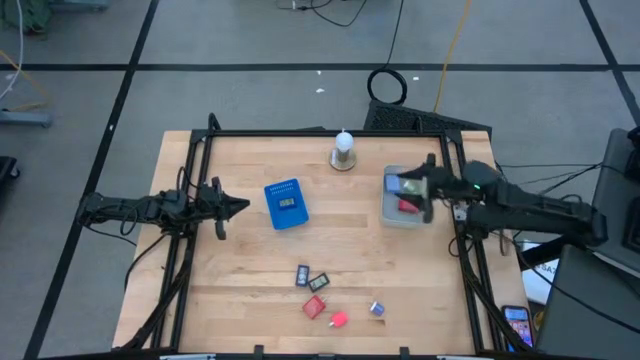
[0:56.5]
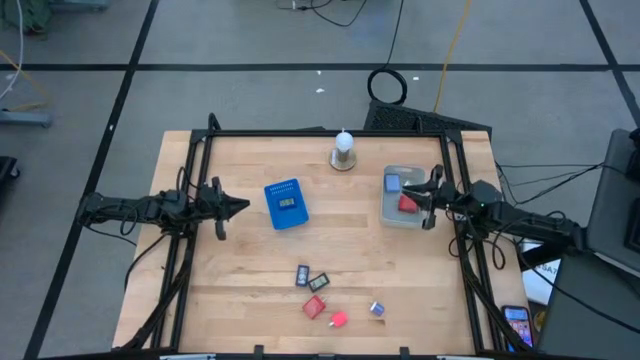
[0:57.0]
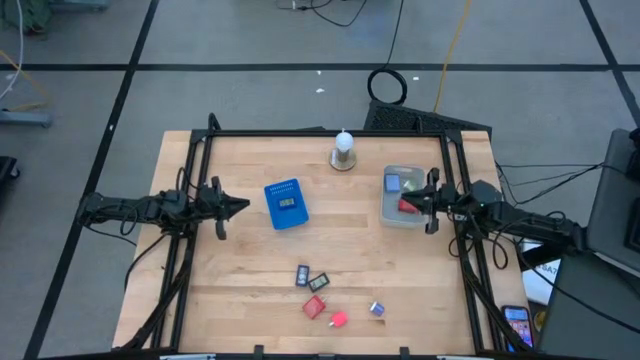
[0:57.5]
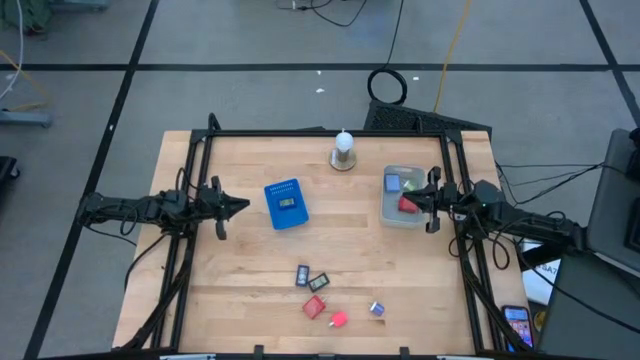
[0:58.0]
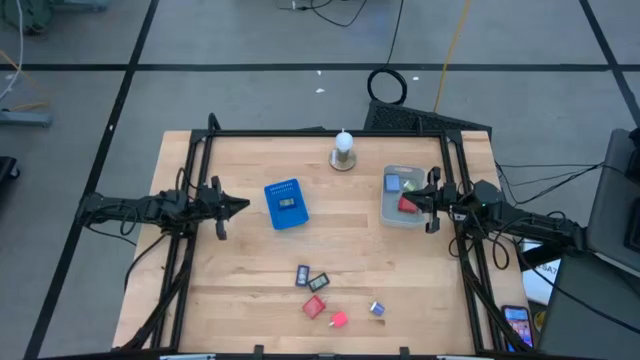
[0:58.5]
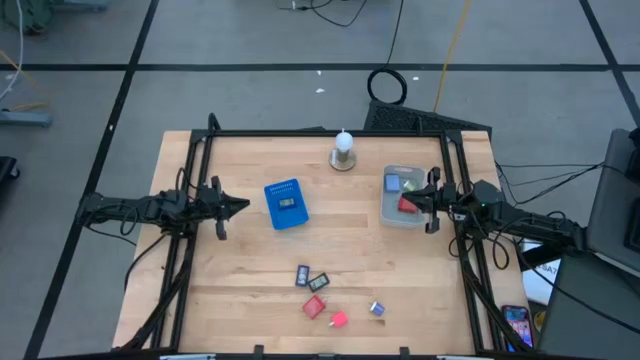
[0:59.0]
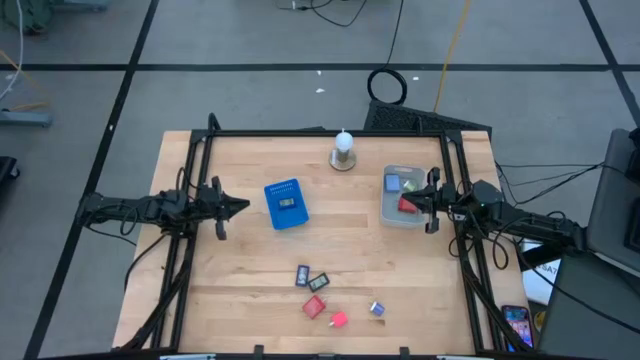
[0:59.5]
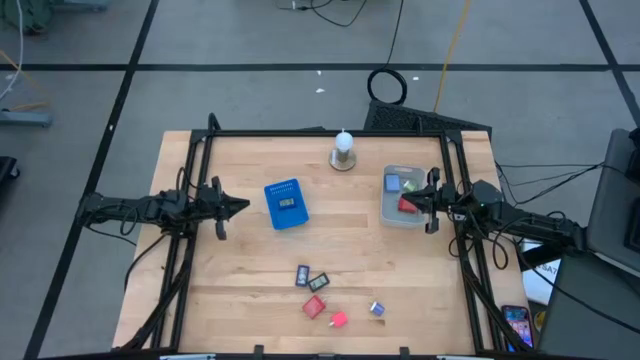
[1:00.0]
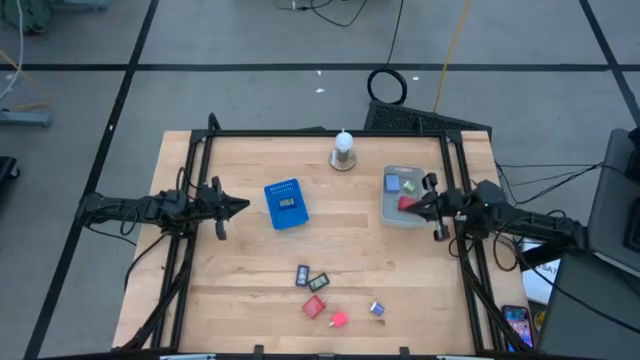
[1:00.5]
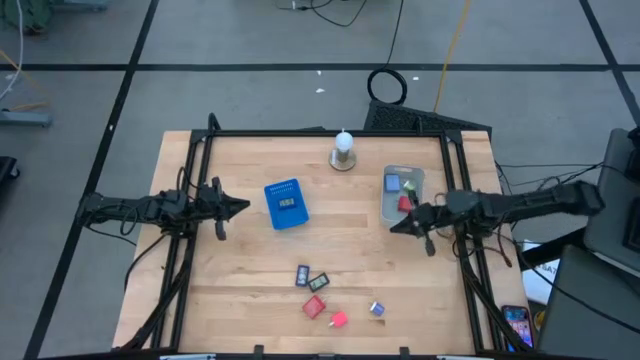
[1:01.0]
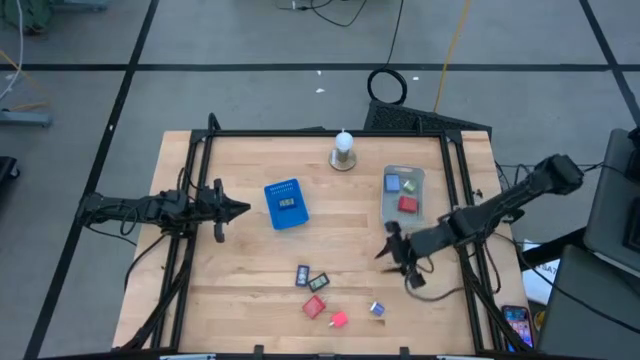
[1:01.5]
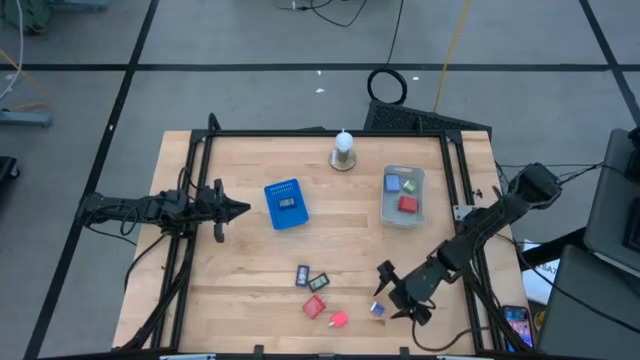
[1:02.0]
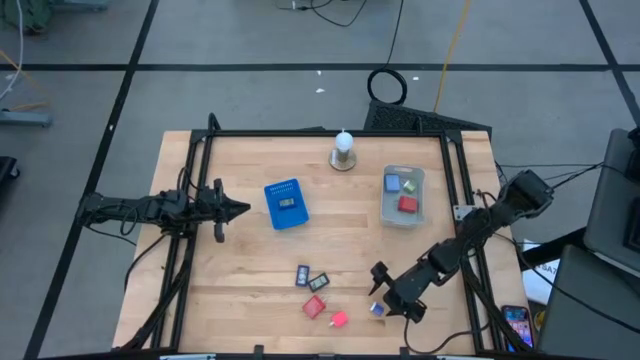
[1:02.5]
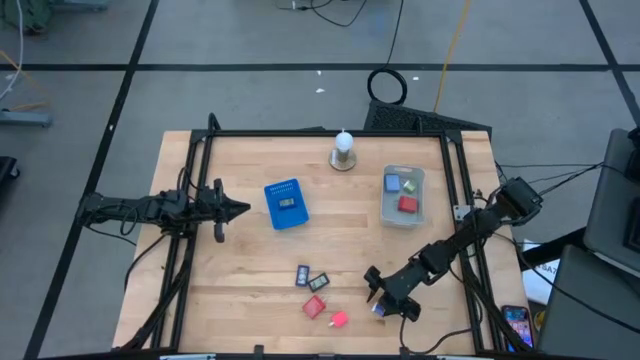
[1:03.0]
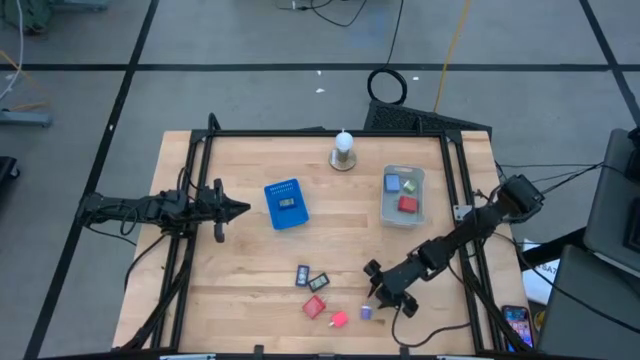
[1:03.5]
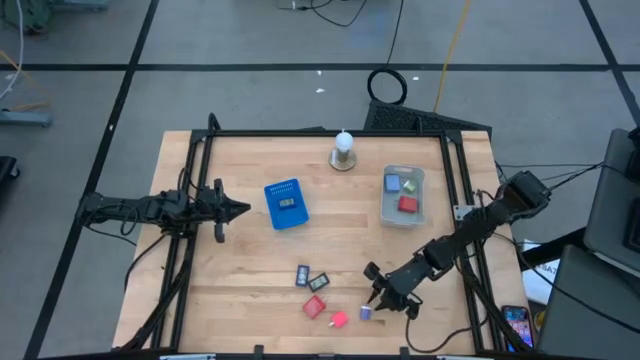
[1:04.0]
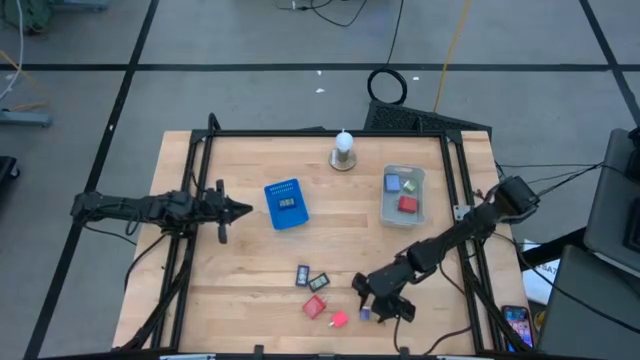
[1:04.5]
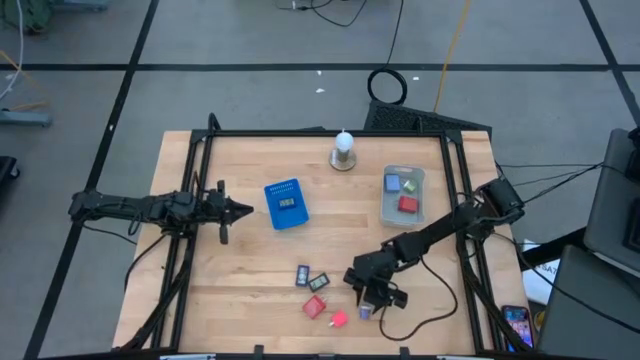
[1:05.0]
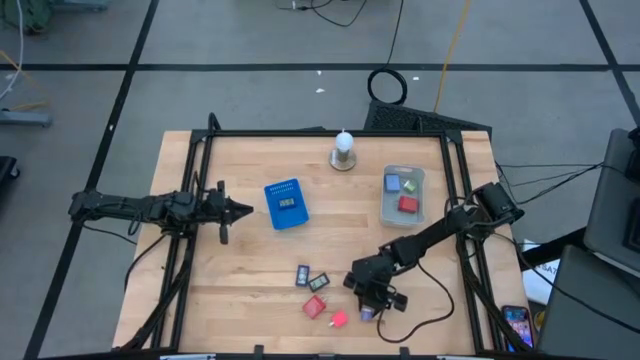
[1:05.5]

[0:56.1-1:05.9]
Task: Pick & Place Office items
Put the dark blue charger adapter into the gray bin

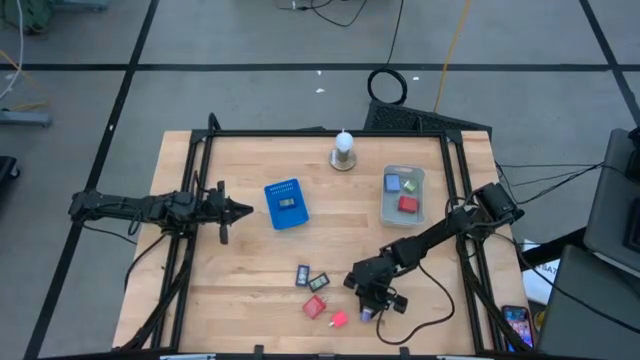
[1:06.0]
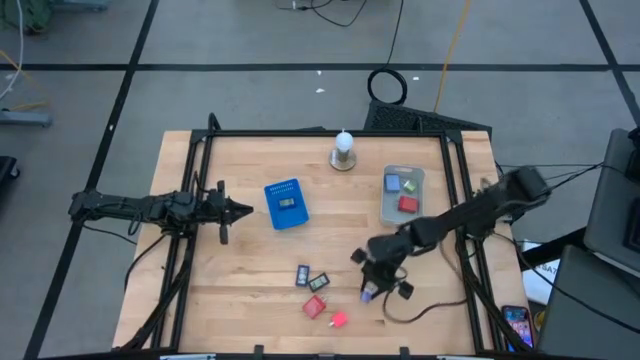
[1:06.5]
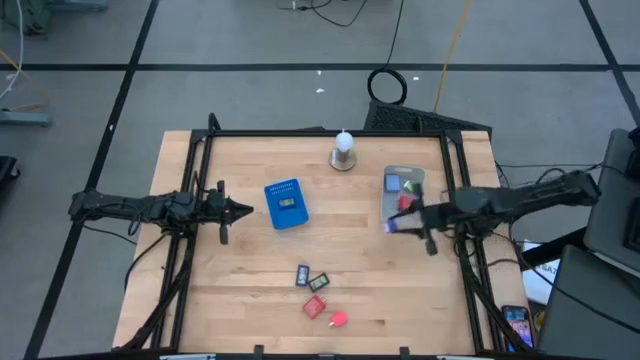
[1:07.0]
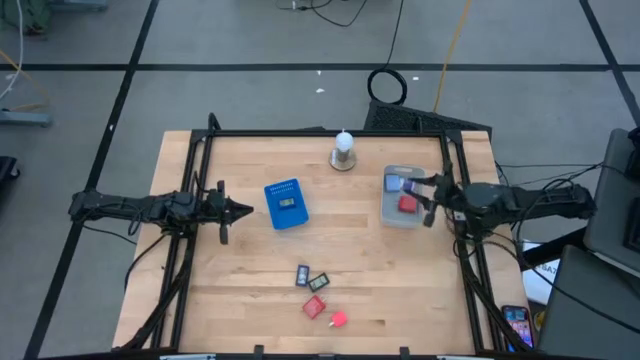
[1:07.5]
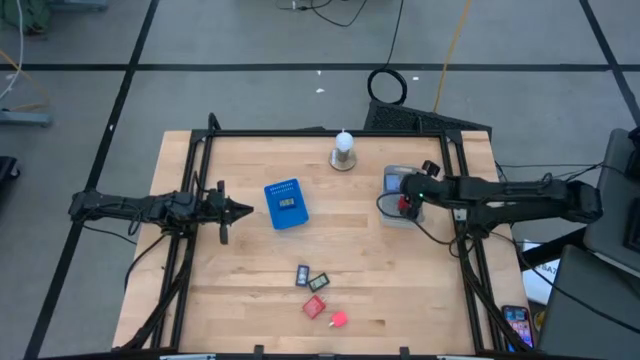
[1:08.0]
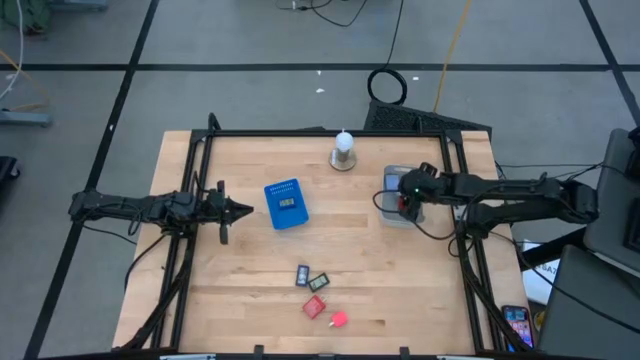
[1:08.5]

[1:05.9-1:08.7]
Put the dark blue charger adapter into the gray bin

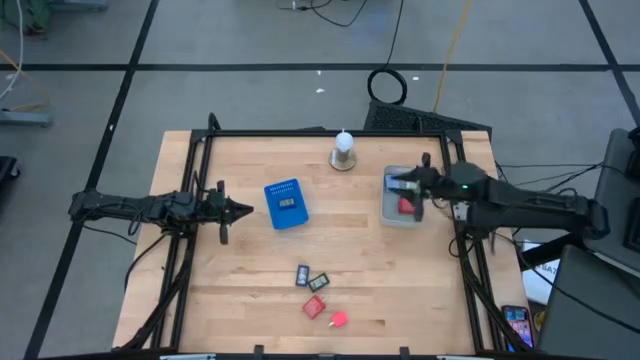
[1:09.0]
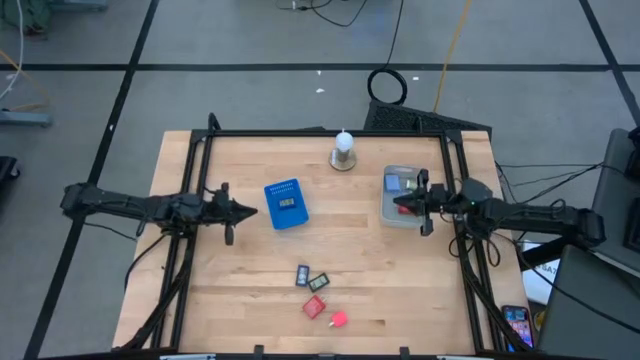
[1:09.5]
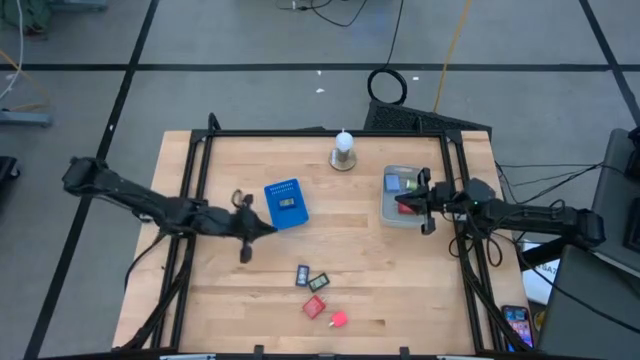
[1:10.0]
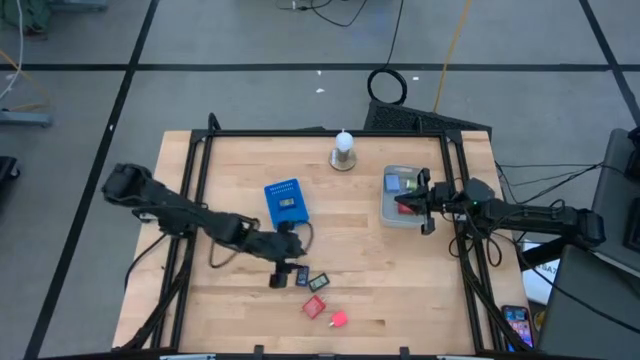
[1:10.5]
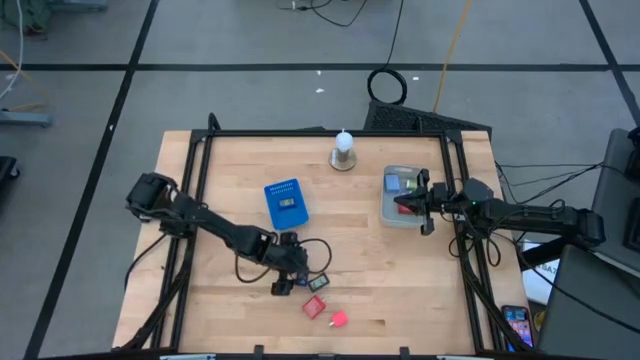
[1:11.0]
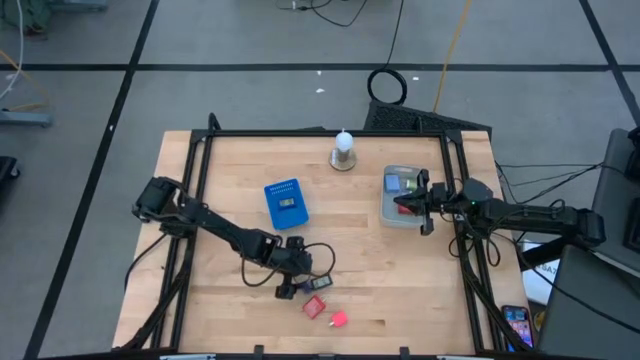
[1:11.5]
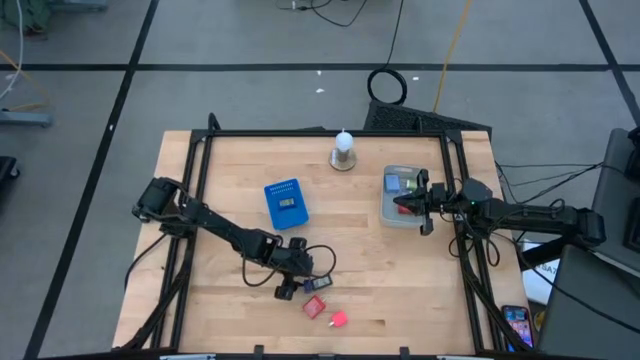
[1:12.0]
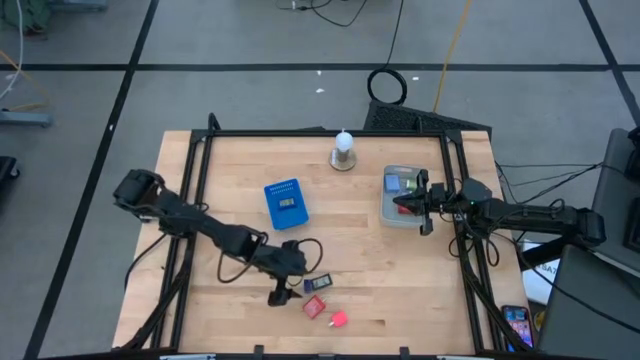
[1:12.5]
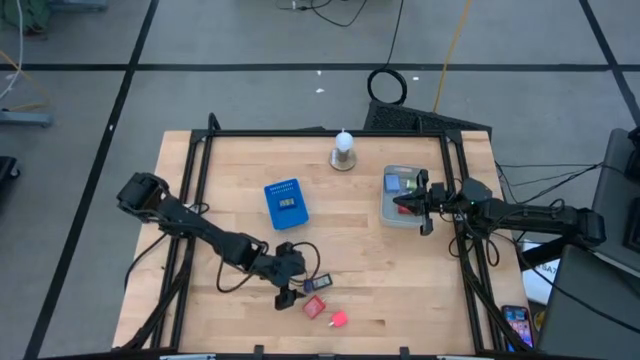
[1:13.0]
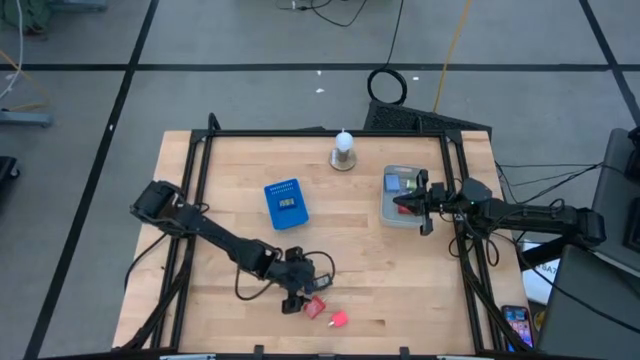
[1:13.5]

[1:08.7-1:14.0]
Put the blue digital timer into the blue bin

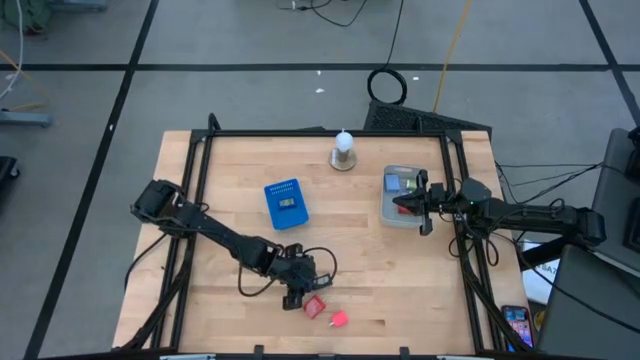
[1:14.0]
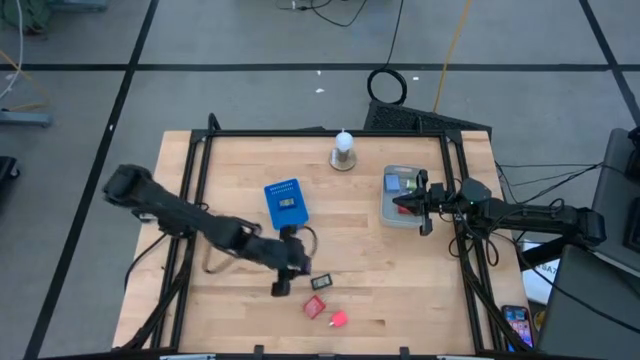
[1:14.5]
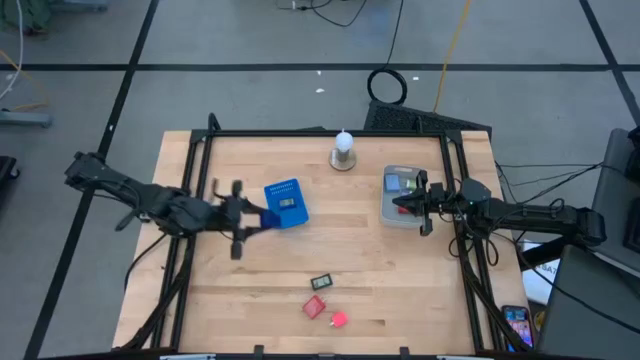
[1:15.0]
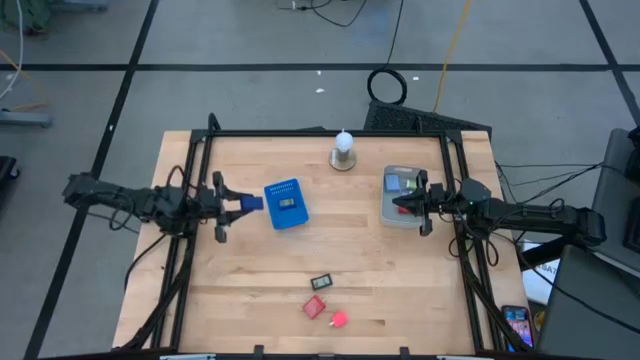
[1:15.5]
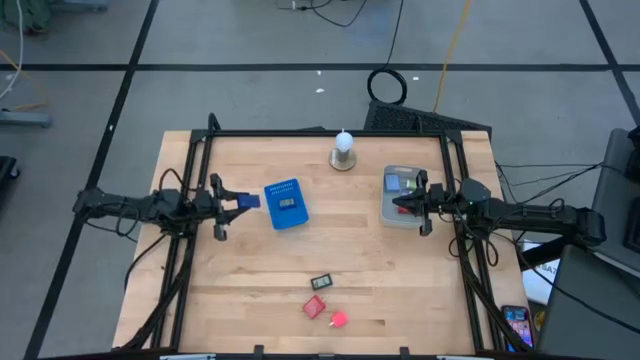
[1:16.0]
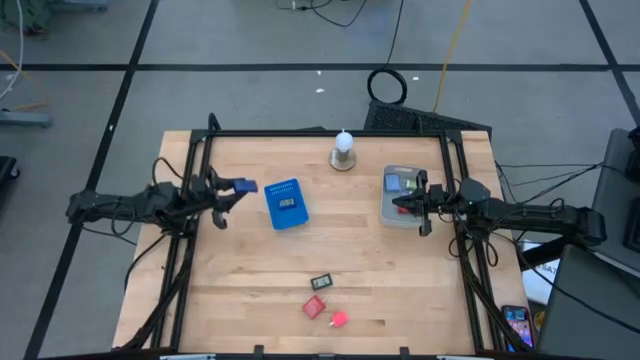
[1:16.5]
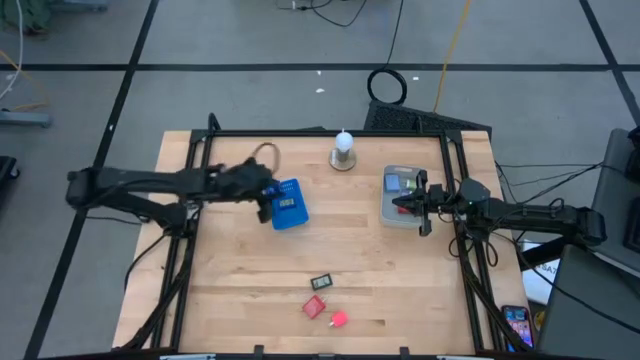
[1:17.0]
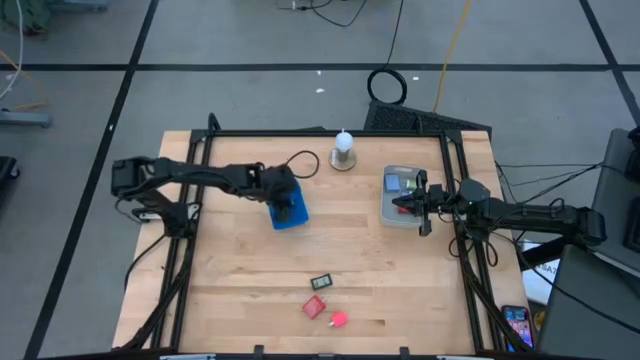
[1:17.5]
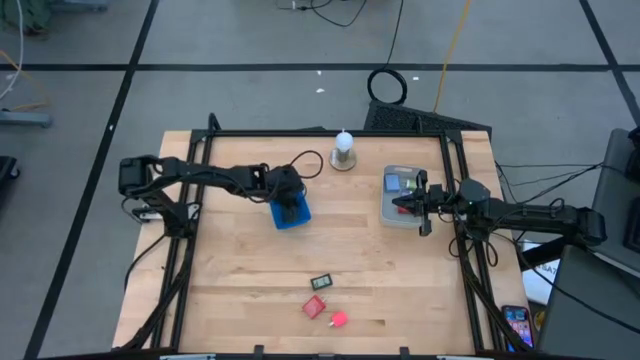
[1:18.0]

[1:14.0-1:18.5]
Put the blue digital clock into the blue bin
